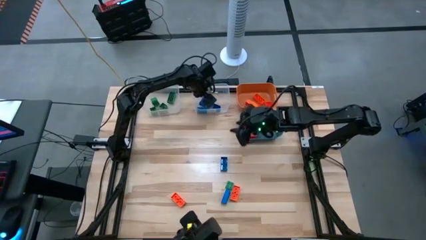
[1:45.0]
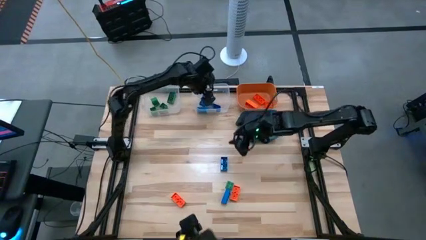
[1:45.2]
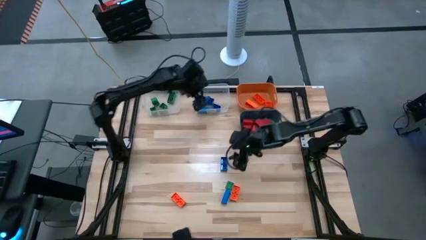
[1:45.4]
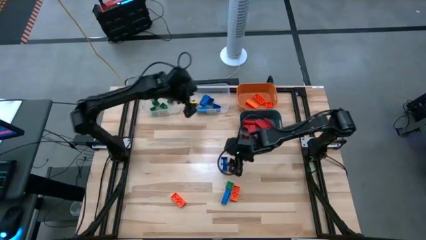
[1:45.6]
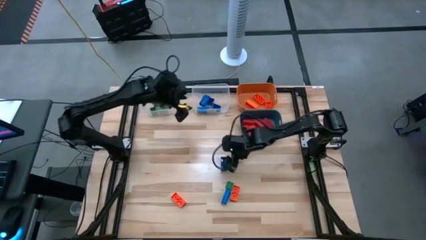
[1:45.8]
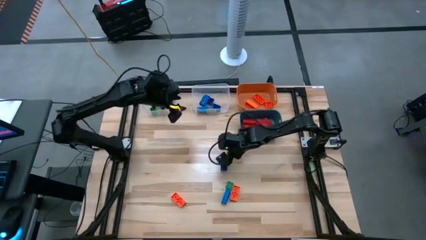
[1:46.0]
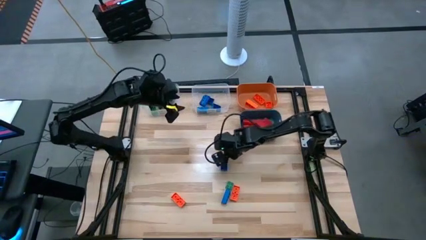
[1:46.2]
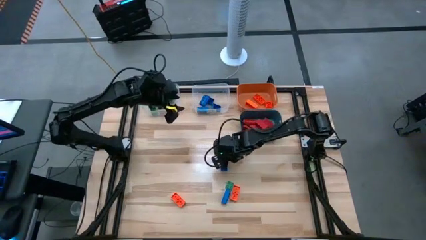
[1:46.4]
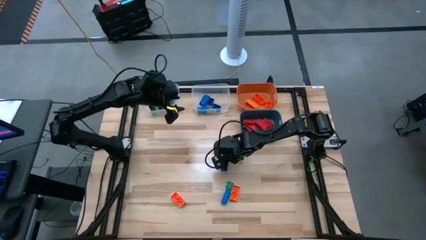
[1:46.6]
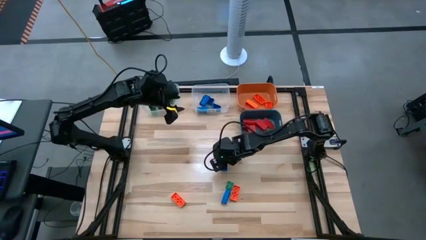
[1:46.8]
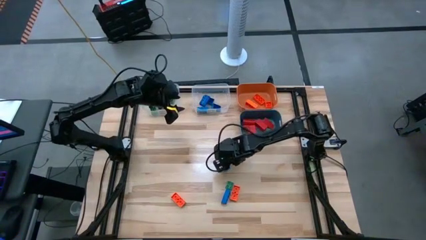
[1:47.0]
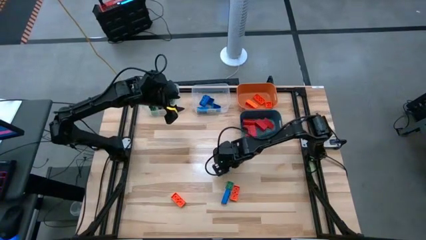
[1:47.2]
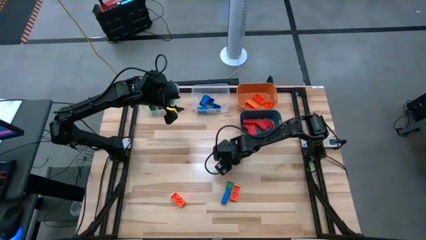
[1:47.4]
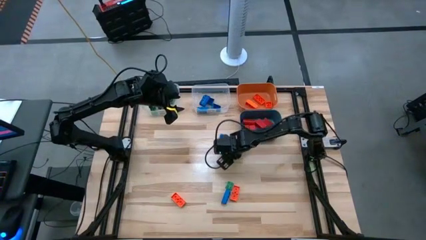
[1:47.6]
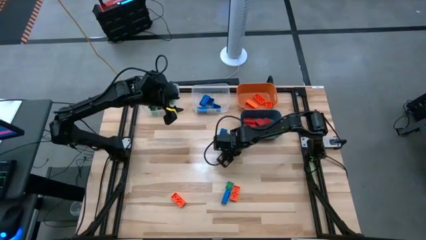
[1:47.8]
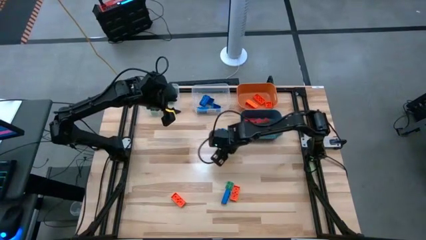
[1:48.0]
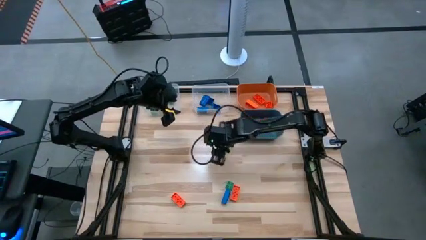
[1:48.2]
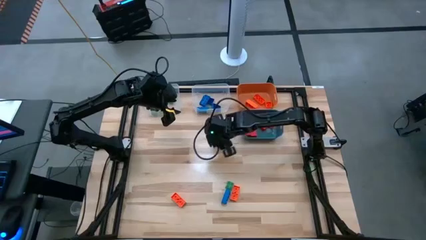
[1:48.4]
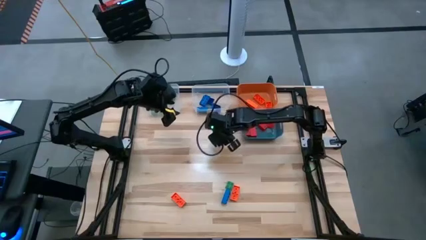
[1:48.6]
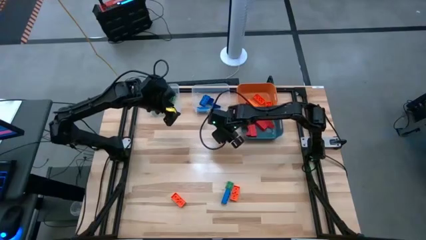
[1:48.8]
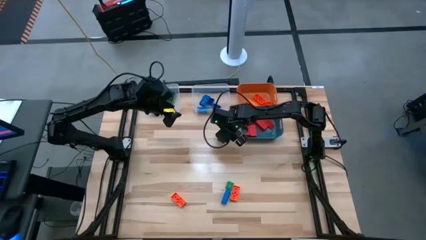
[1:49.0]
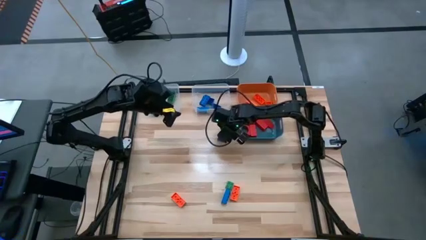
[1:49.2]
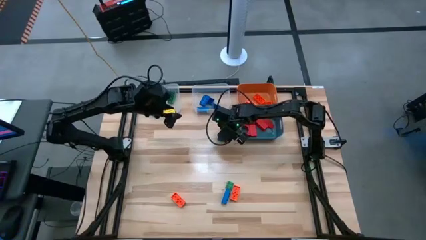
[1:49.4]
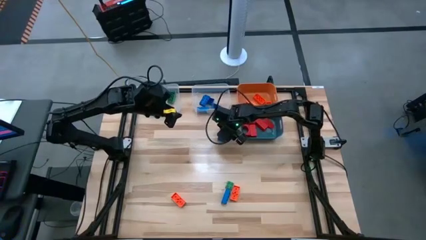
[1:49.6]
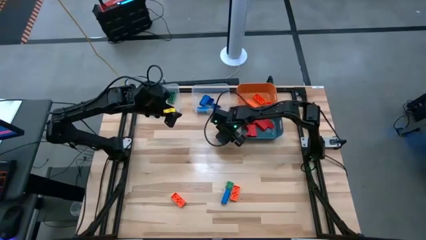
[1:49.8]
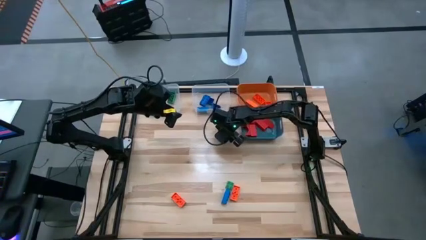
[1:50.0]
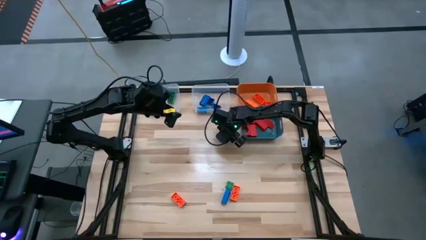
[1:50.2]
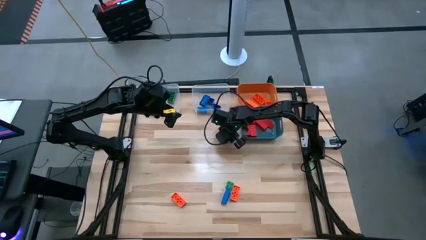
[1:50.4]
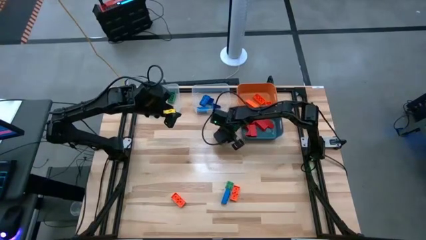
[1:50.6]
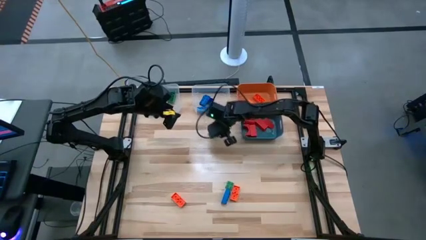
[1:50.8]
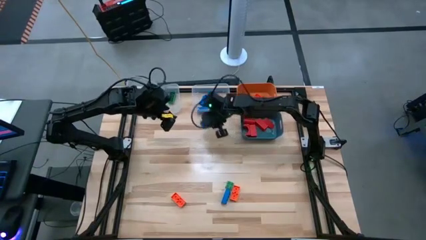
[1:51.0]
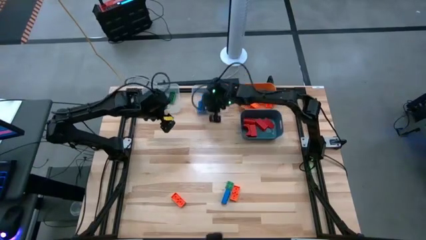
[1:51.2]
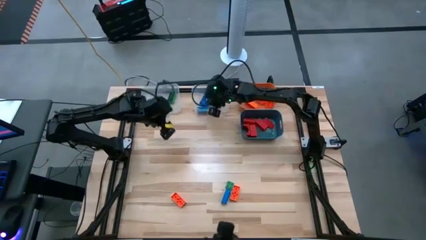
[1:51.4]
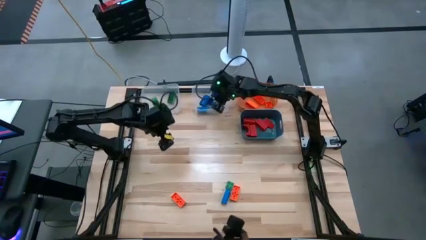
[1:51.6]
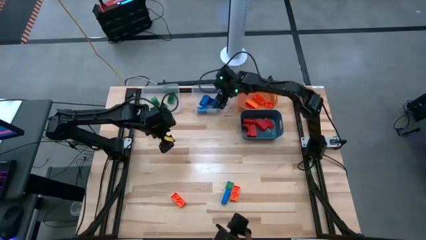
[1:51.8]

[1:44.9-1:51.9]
Task: Sort blocks
Put the blue game piece into the right transparent bin

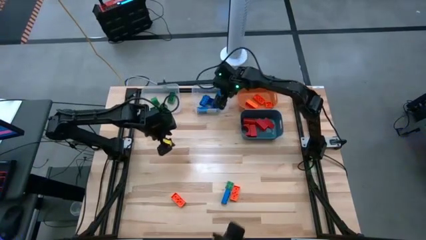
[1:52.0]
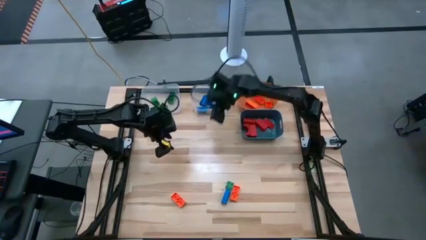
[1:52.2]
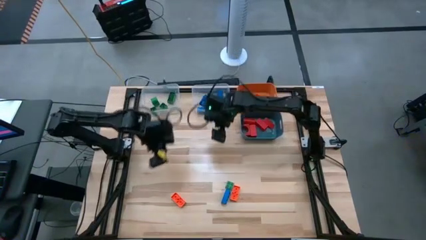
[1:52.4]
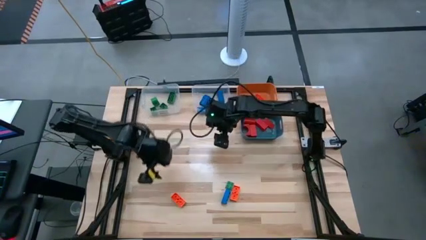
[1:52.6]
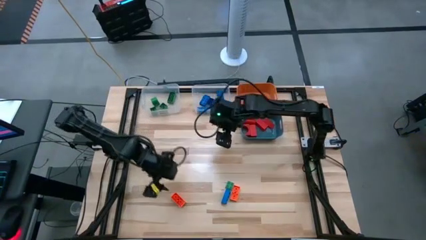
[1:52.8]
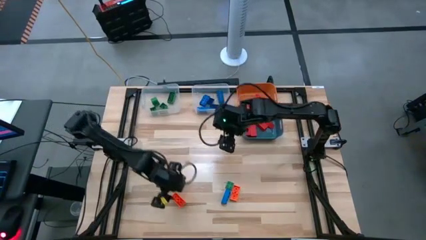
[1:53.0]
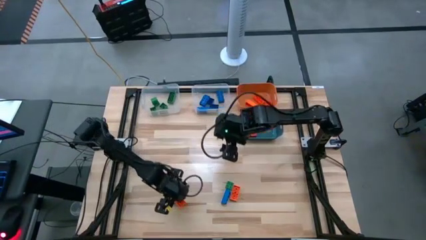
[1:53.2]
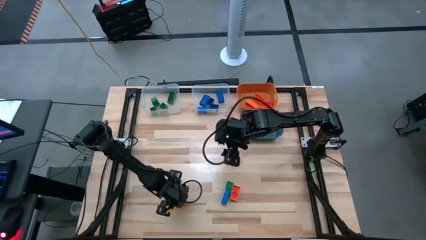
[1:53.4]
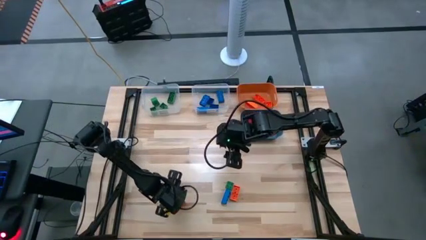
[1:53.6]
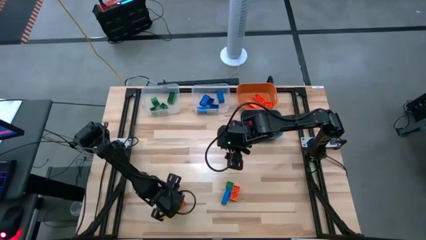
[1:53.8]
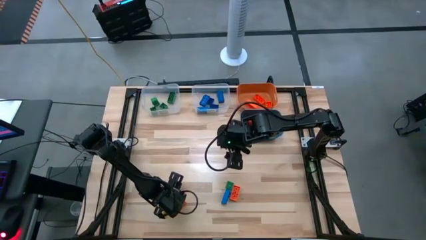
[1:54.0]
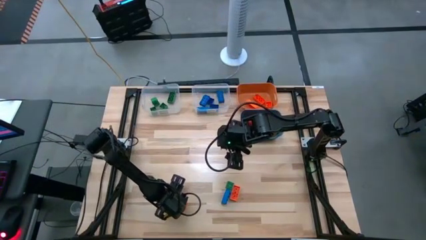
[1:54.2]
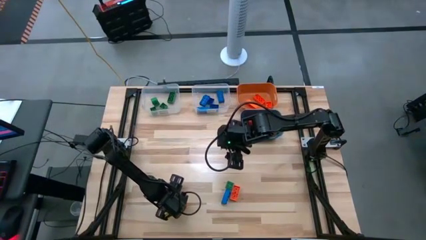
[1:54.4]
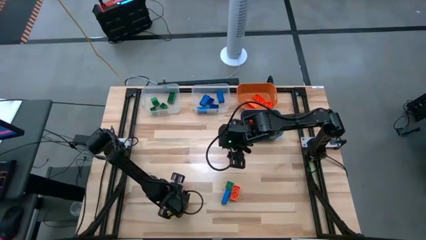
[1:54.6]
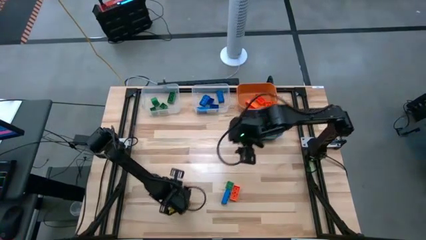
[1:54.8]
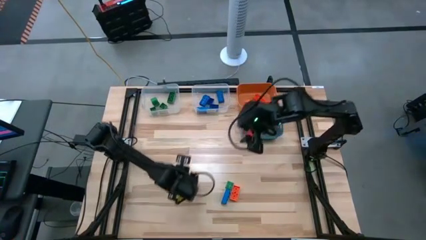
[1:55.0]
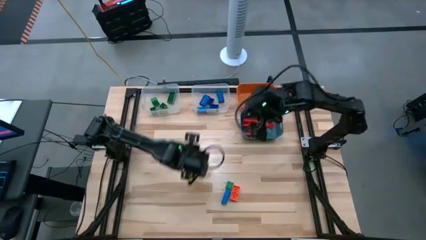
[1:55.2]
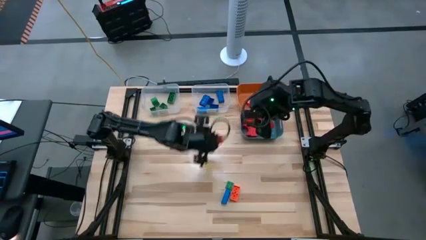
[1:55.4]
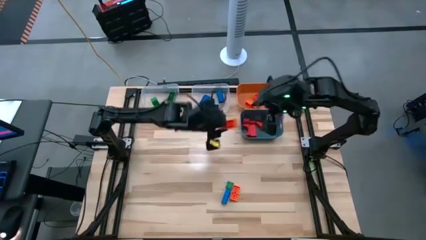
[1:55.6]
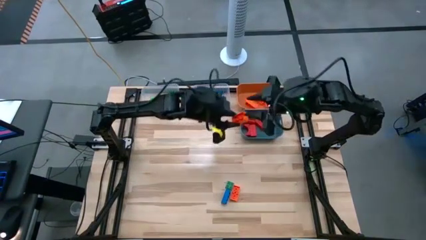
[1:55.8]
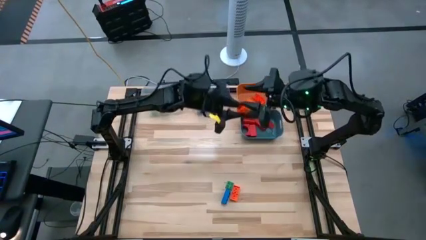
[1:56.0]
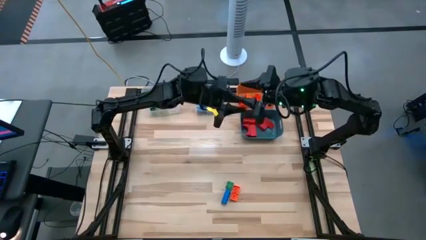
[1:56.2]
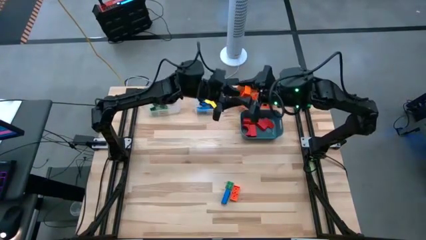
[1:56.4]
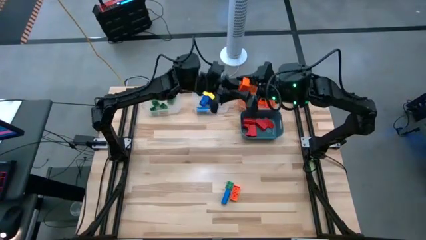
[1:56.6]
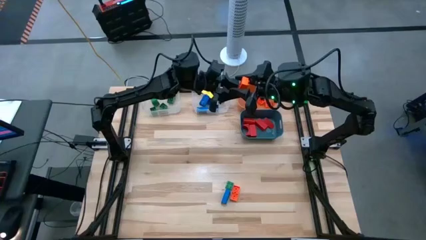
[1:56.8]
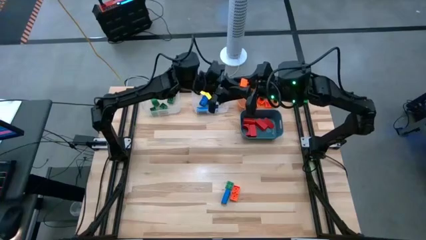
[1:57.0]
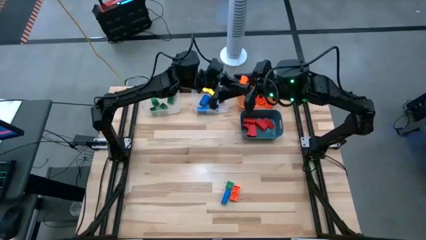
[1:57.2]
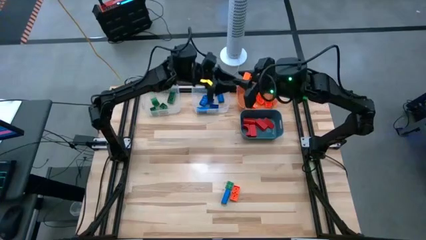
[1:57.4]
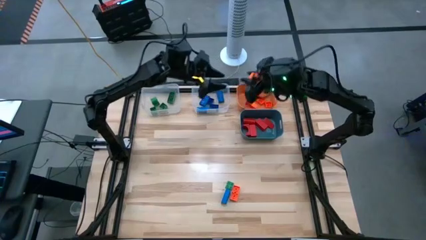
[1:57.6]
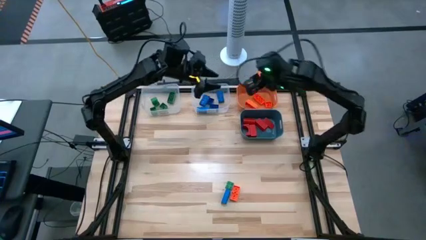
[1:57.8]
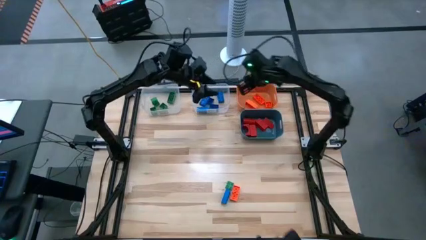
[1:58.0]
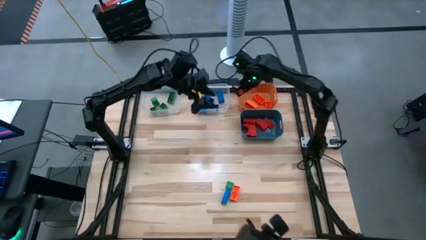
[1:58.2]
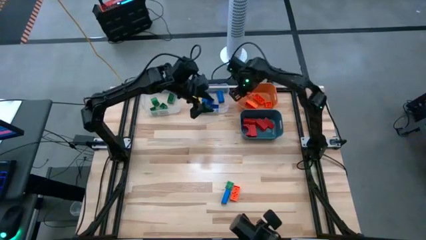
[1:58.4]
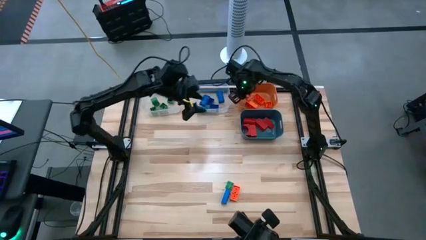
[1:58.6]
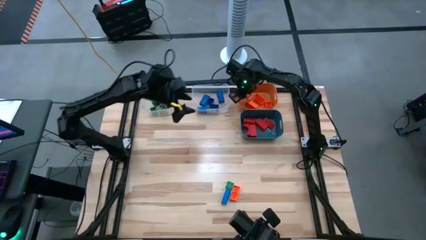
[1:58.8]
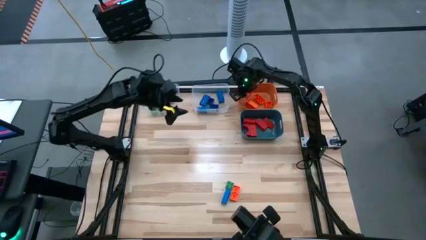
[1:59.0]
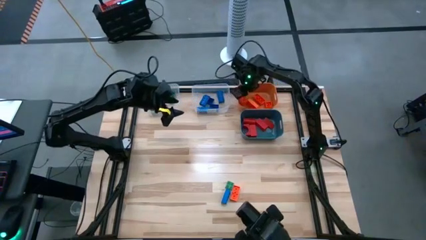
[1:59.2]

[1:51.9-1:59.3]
Put the orange game piece into the orange bin
